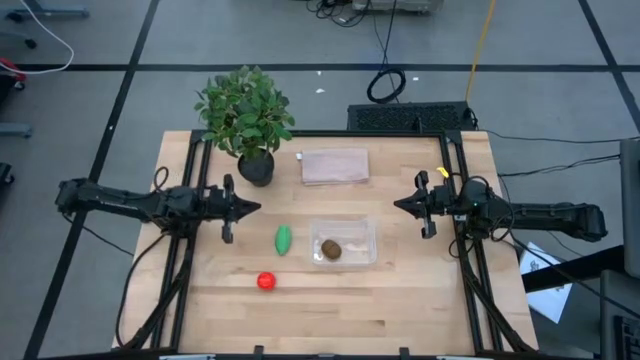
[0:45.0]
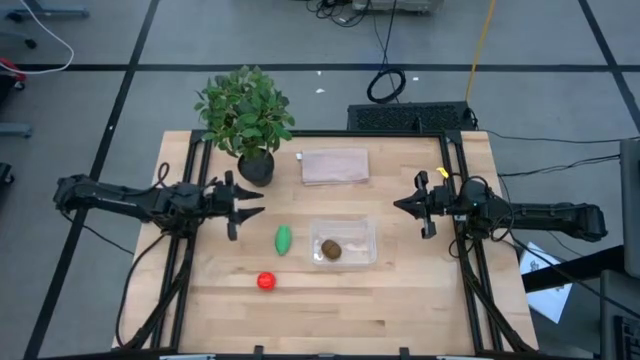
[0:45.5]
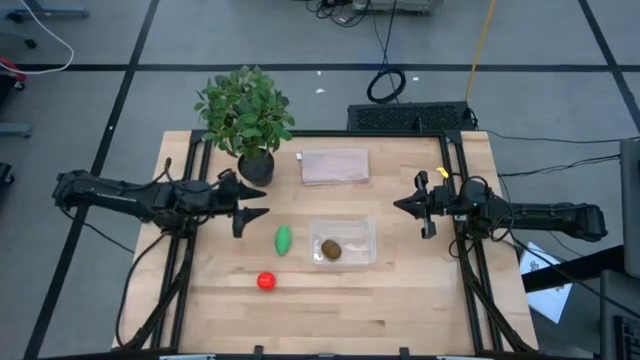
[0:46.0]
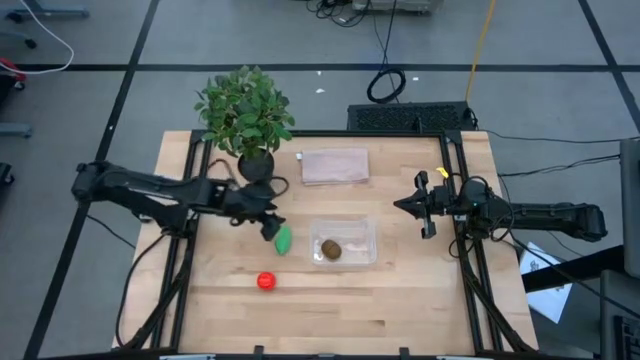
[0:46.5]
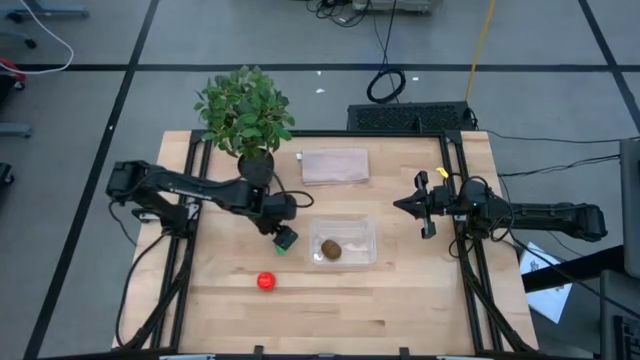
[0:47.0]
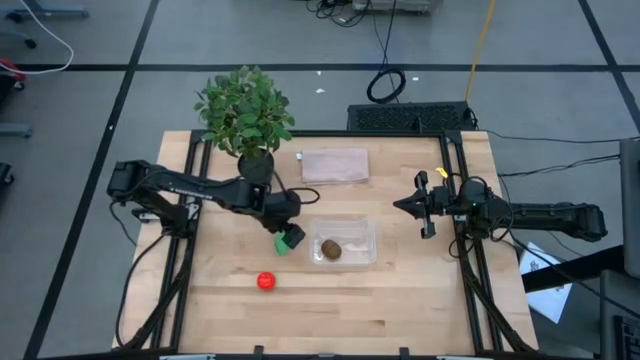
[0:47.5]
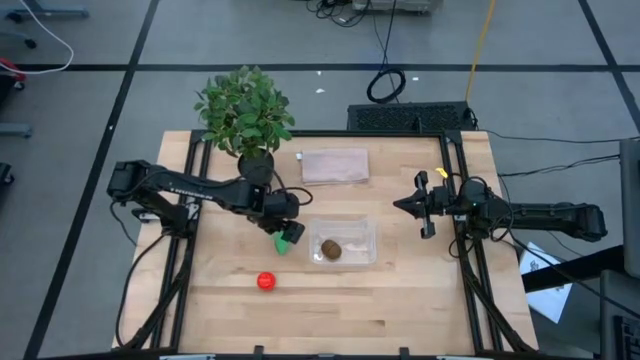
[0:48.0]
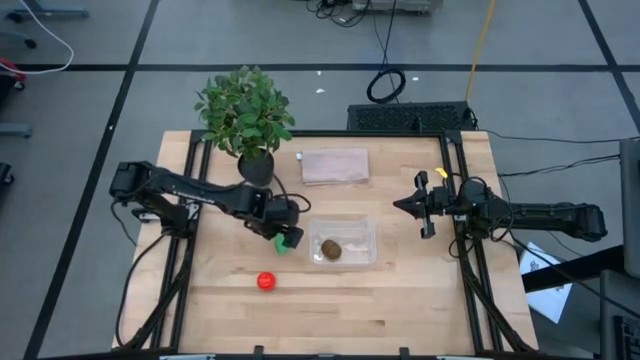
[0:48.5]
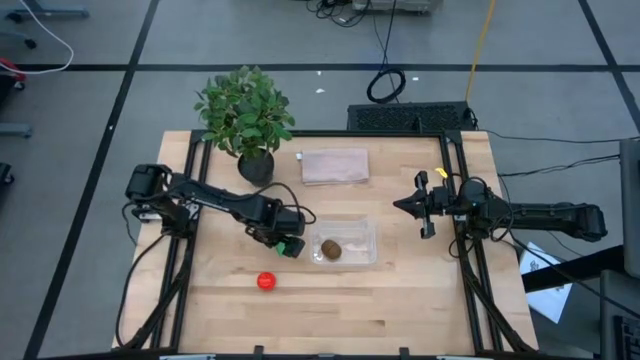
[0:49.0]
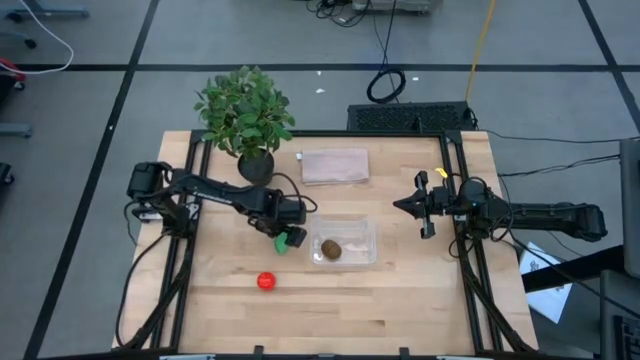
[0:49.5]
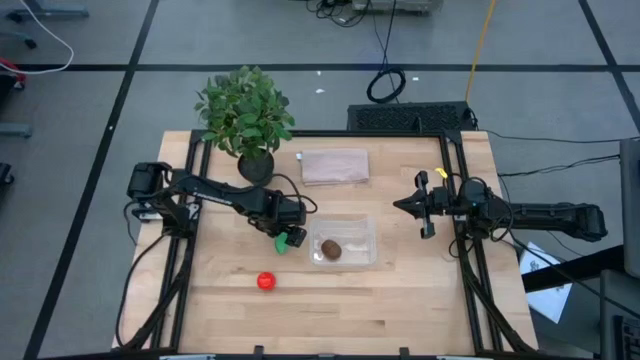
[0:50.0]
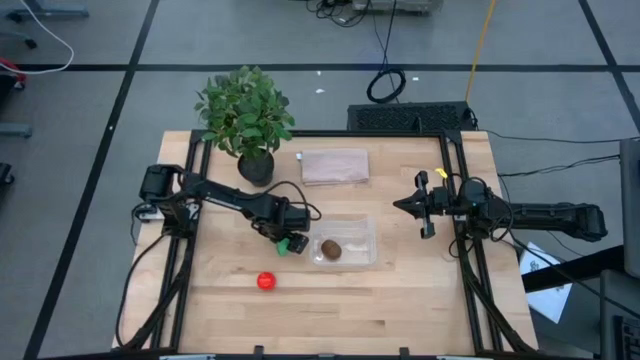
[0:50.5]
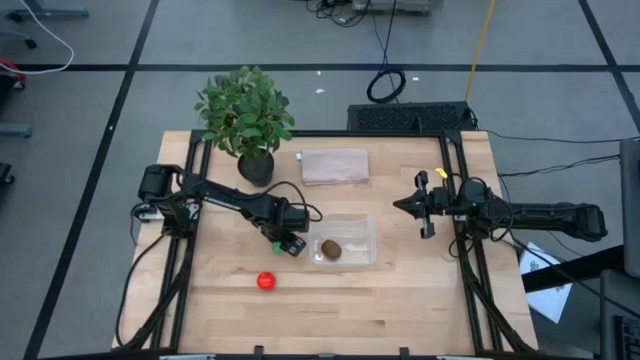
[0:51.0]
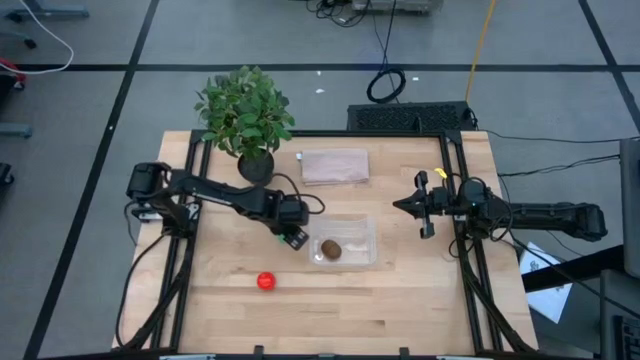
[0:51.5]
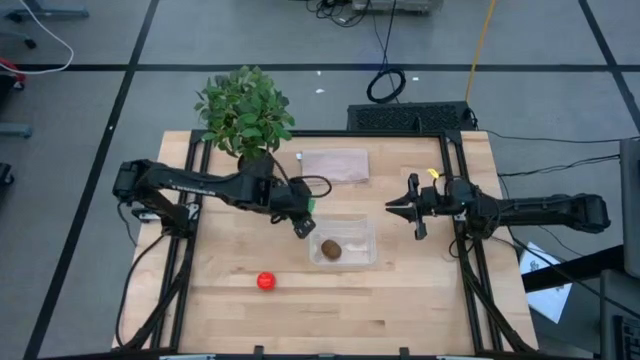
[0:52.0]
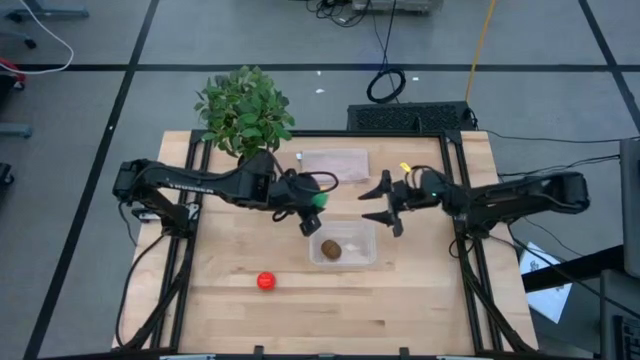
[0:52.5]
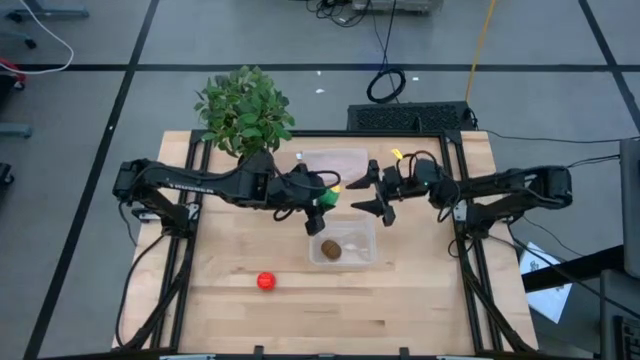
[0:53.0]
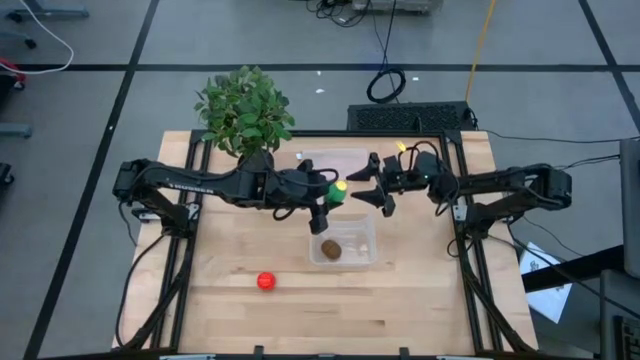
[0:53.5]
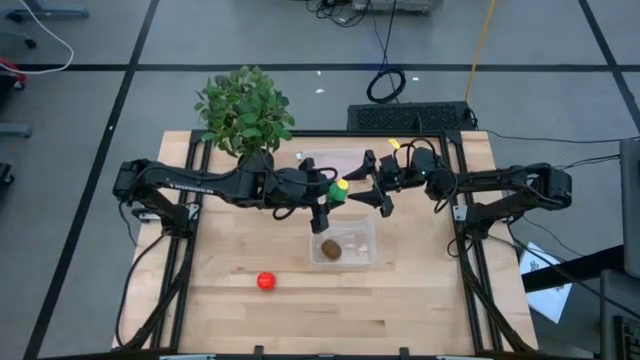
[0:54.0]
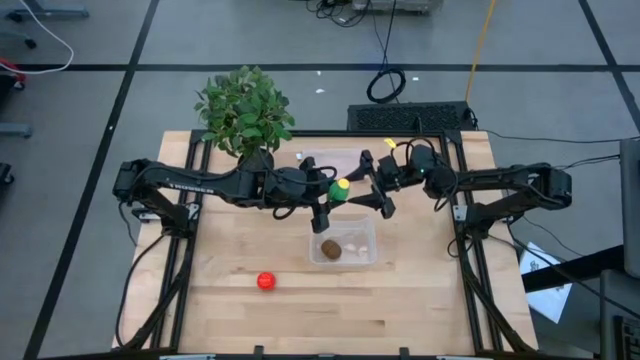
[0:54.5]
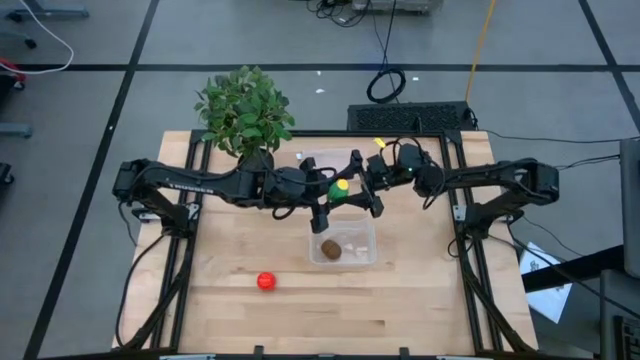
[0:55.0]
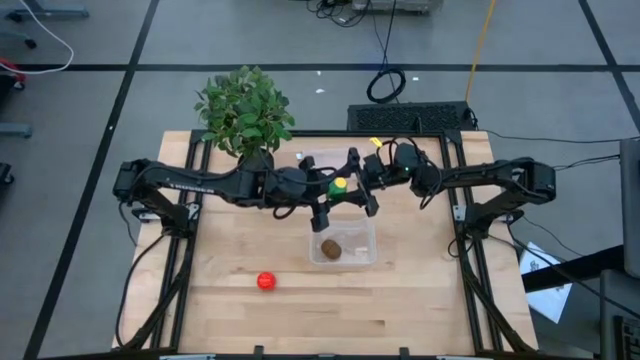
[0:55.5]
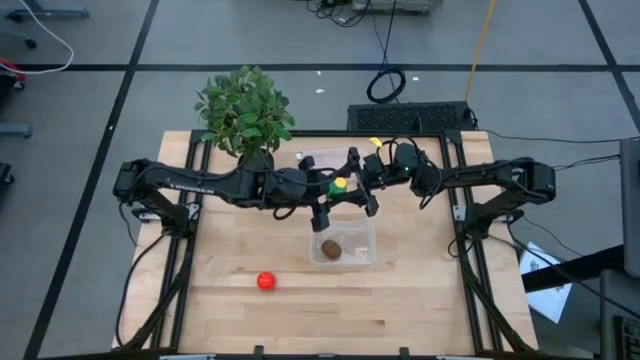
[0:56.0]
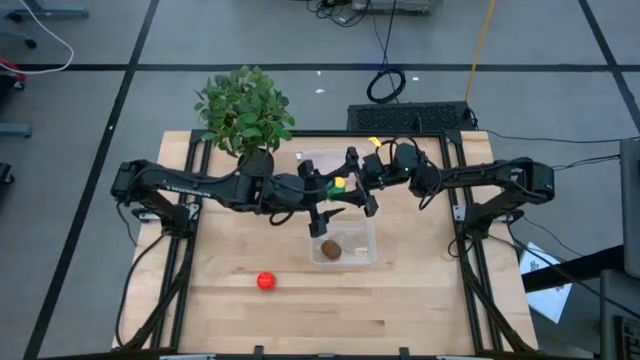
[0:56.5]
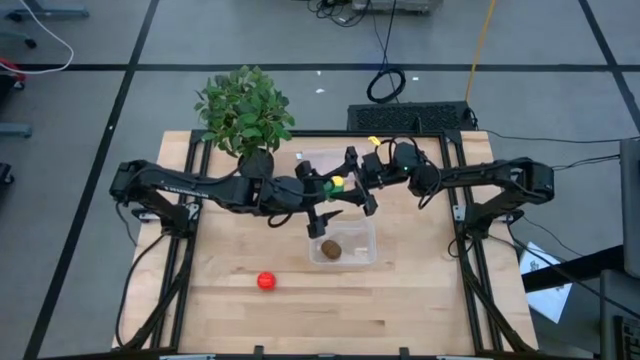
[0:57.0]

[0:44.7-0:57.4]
Task: Pick and placing Produce into tupperware
Put the green corn into the transparent bin

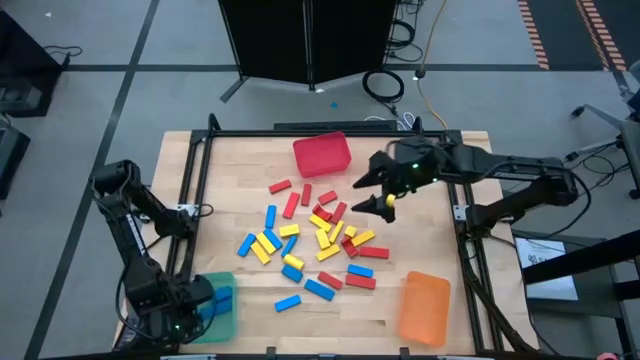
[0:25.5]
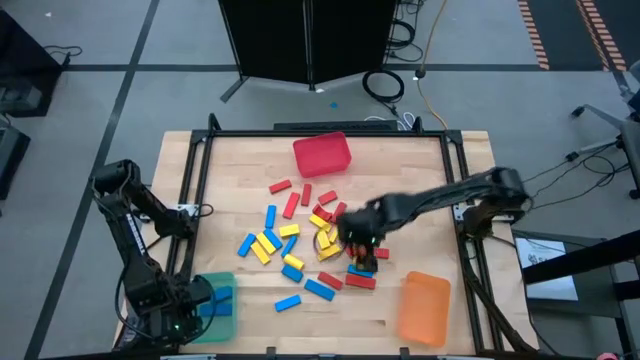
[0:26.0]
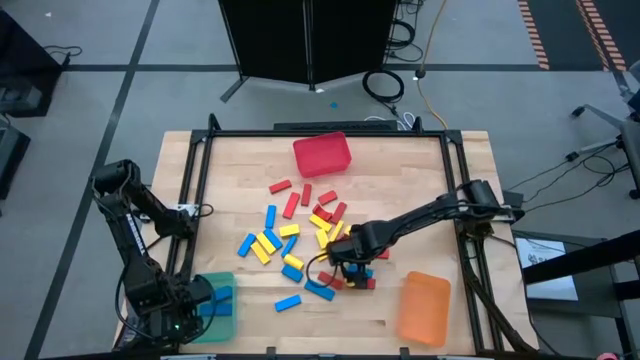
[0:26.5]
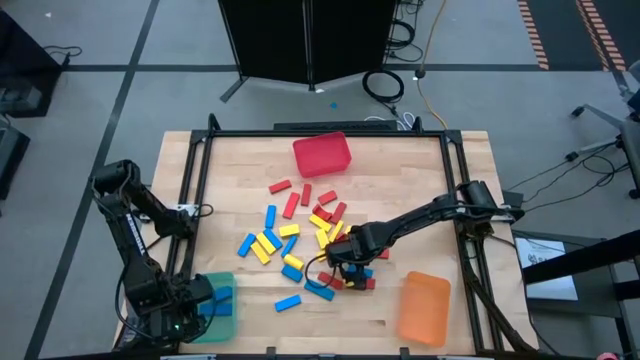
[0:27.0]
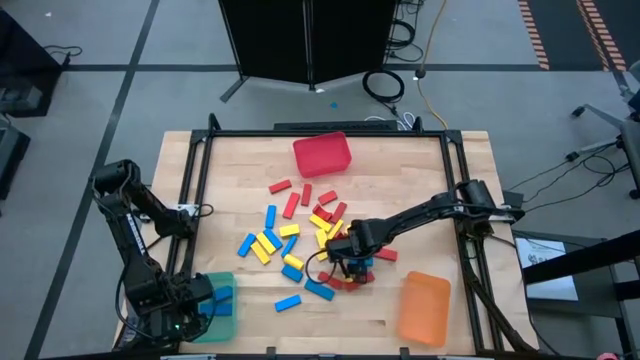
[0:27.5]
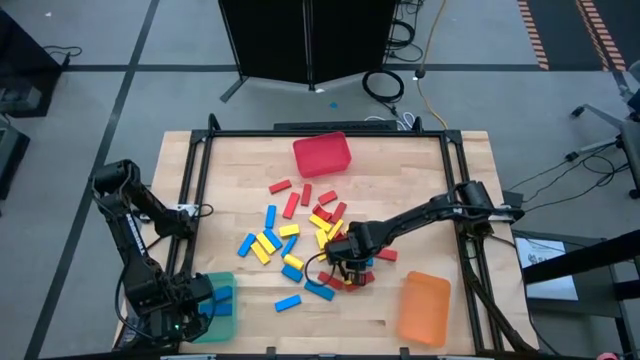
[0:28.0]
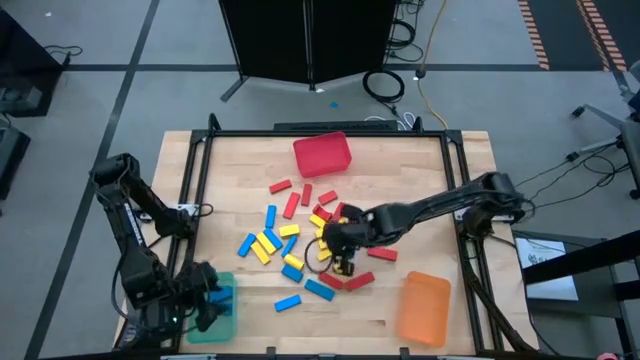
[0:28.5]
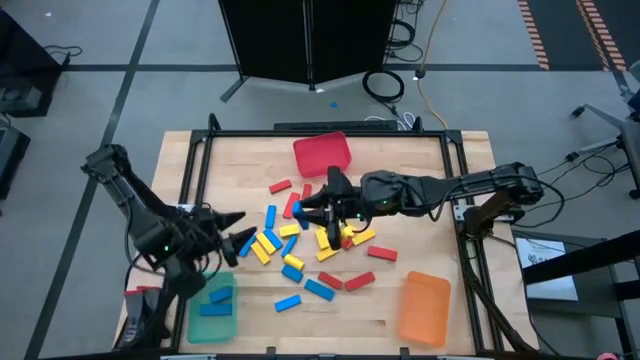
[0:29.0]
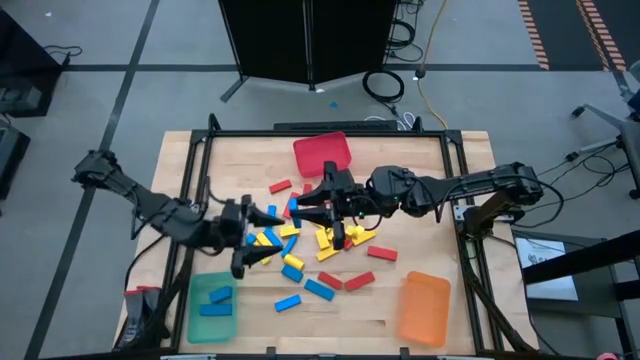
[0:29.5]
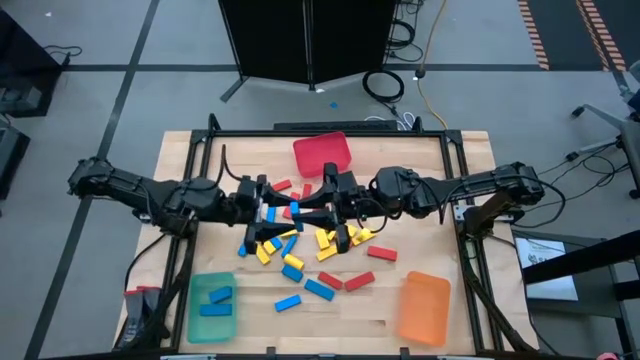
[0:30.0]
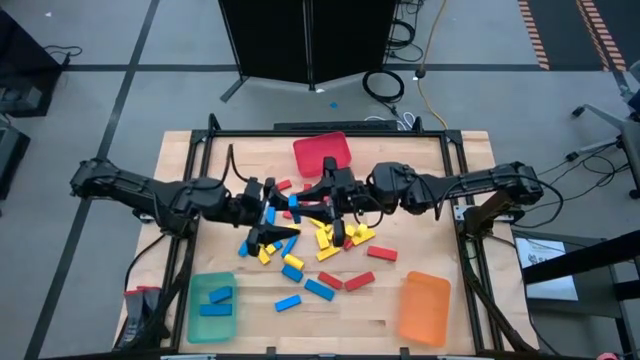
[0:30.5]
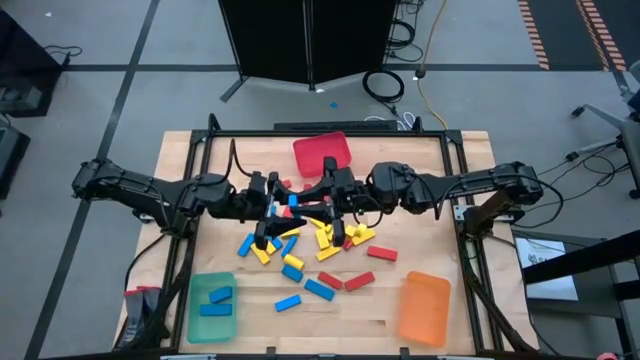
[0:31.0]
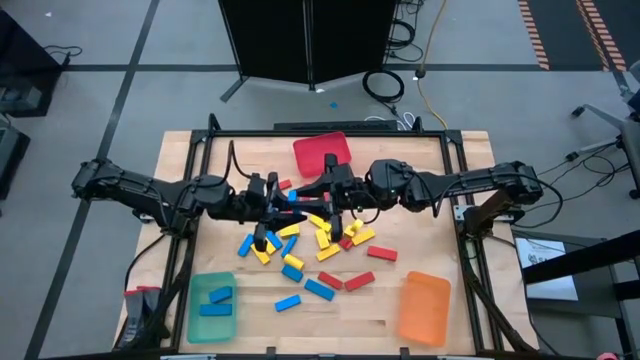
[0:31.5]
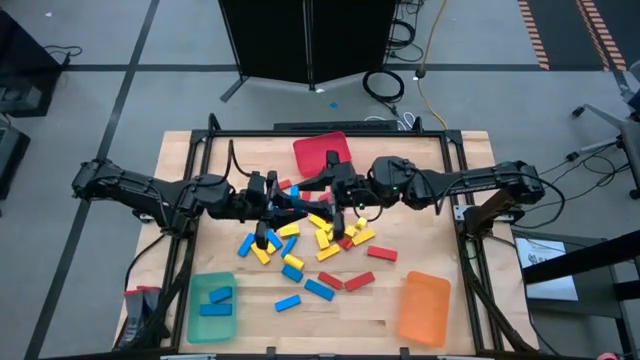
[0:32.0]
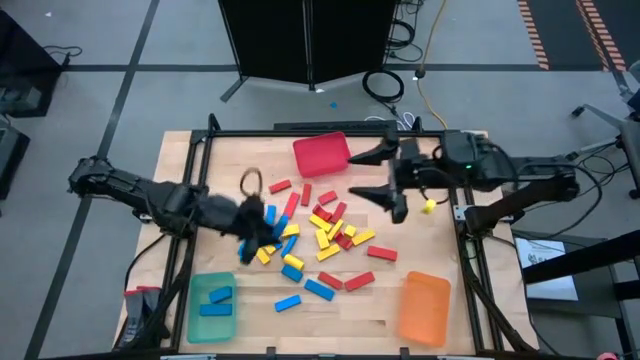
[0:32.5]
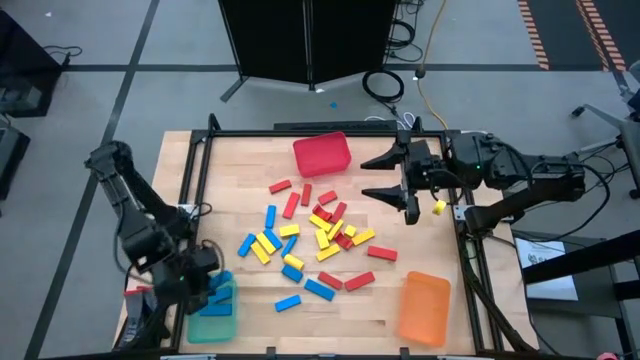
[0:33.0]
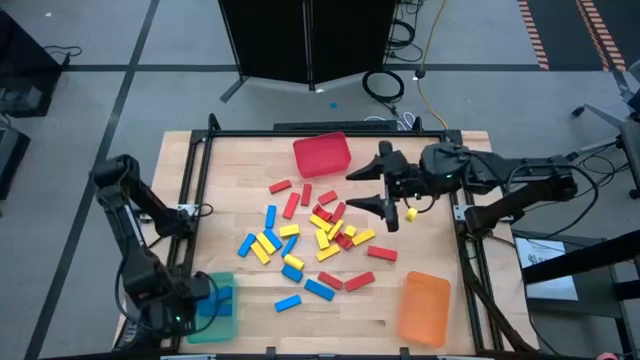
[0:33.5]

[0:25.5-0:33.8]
Task: Sort blocks
Put the blue block into the green bin
